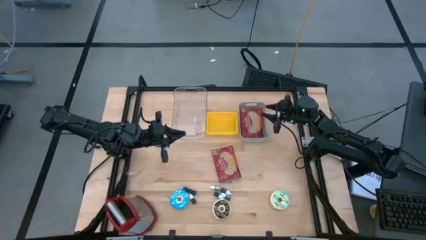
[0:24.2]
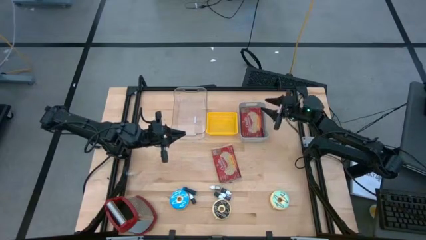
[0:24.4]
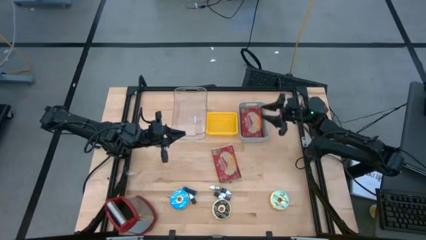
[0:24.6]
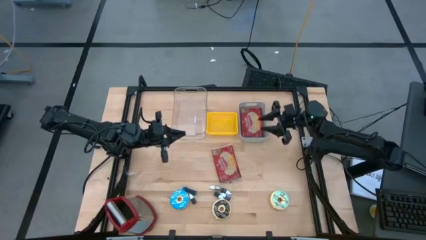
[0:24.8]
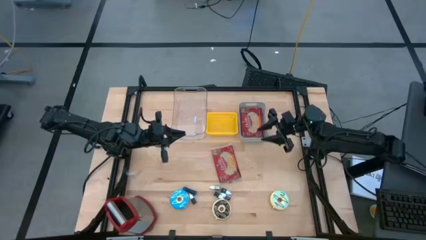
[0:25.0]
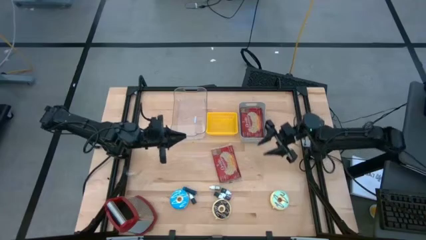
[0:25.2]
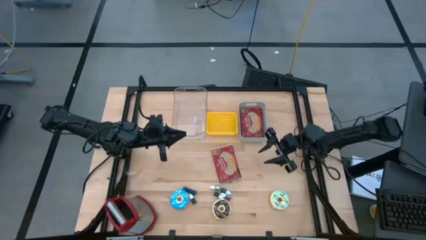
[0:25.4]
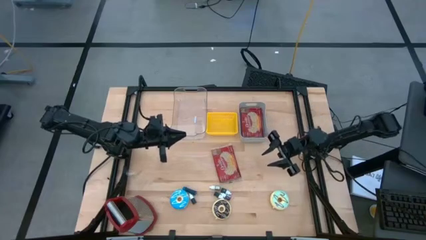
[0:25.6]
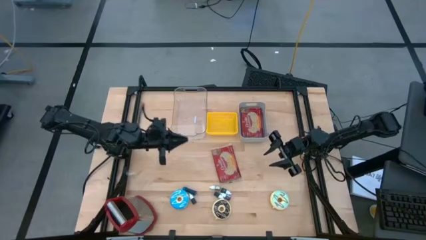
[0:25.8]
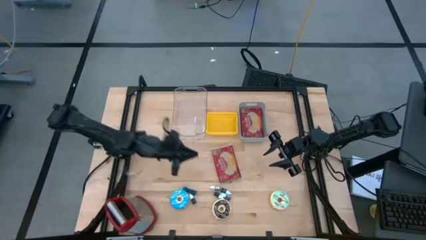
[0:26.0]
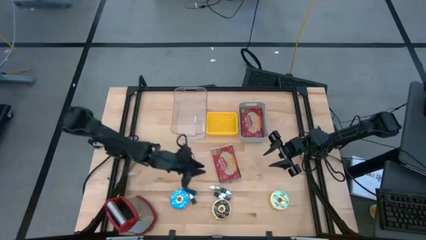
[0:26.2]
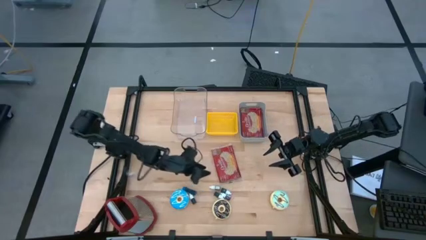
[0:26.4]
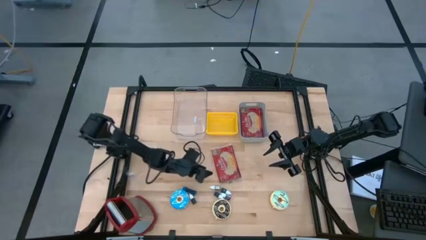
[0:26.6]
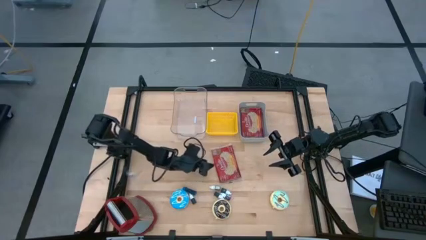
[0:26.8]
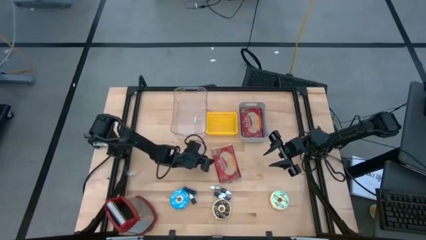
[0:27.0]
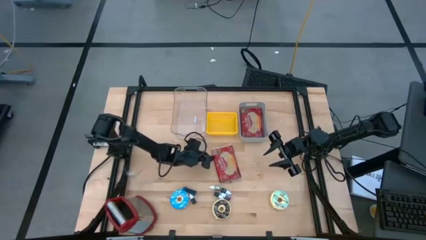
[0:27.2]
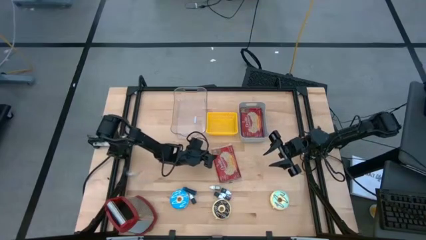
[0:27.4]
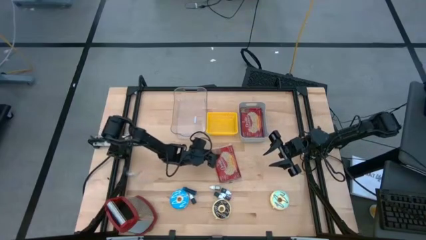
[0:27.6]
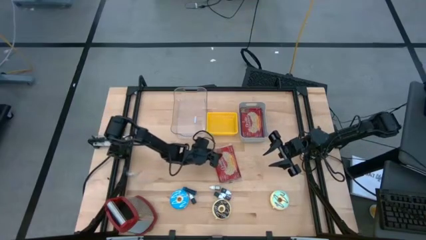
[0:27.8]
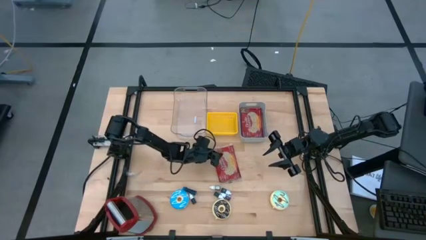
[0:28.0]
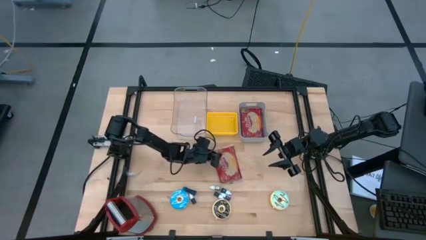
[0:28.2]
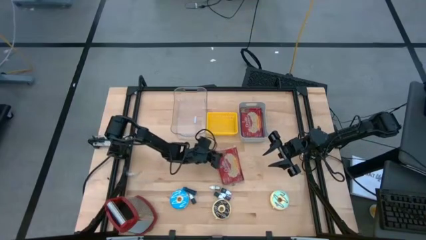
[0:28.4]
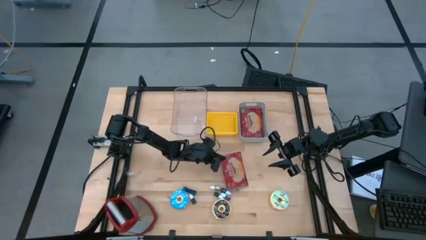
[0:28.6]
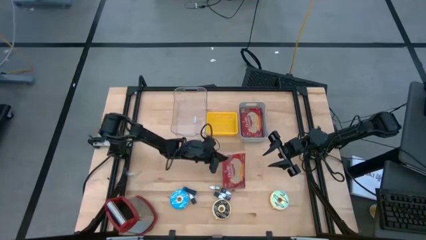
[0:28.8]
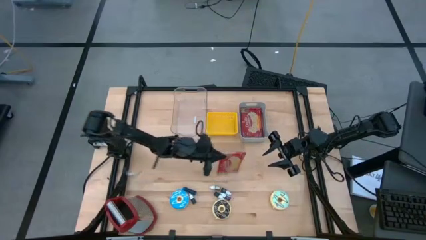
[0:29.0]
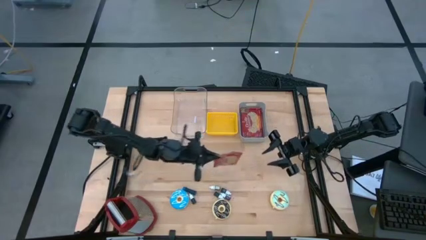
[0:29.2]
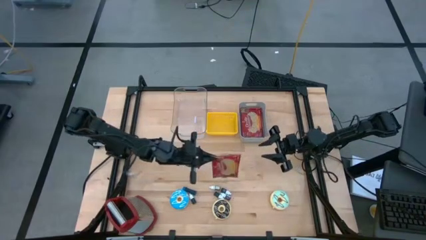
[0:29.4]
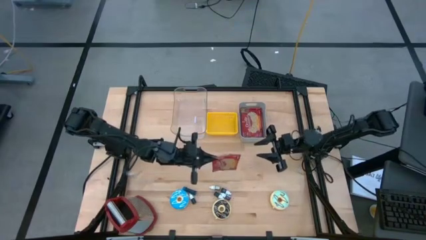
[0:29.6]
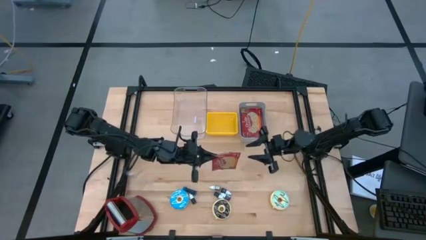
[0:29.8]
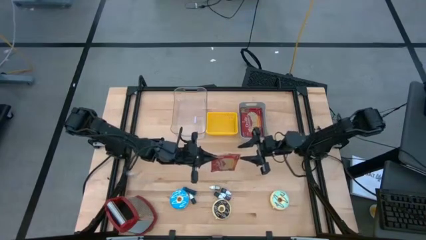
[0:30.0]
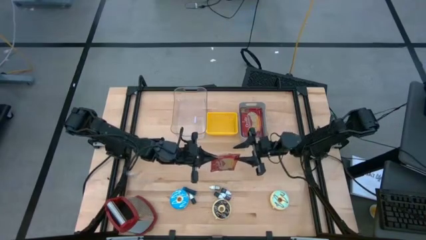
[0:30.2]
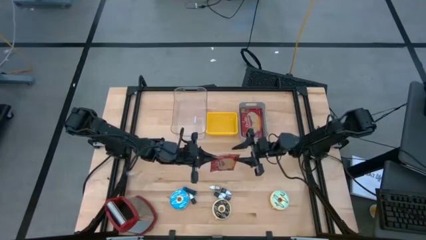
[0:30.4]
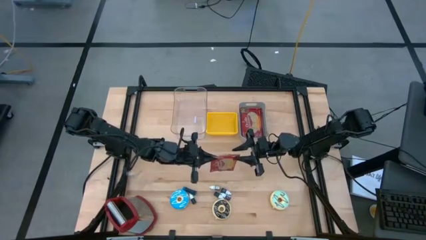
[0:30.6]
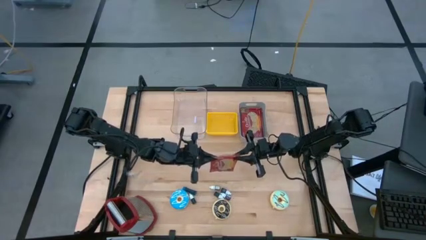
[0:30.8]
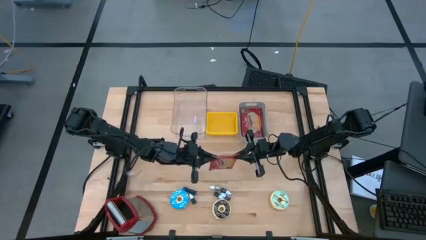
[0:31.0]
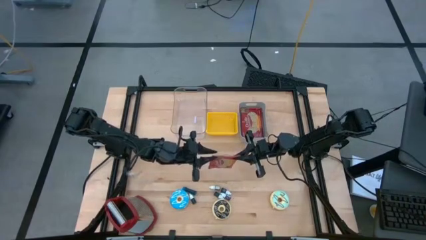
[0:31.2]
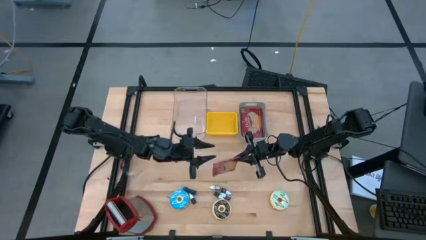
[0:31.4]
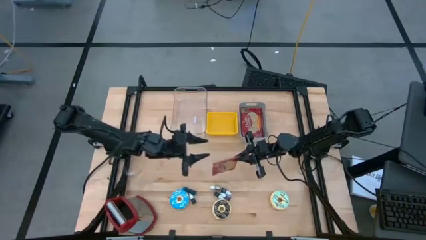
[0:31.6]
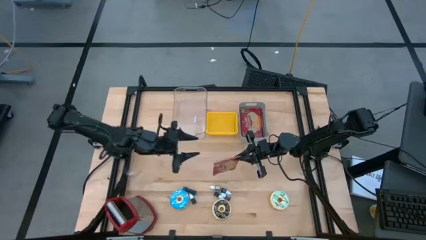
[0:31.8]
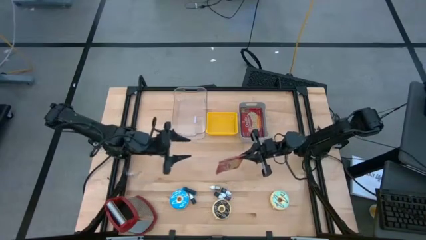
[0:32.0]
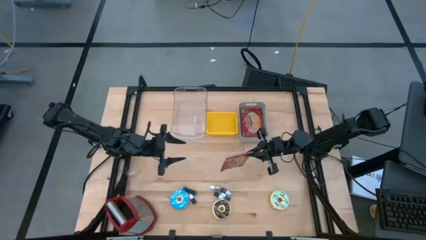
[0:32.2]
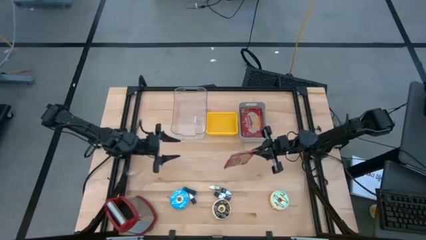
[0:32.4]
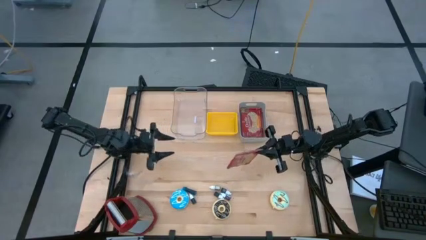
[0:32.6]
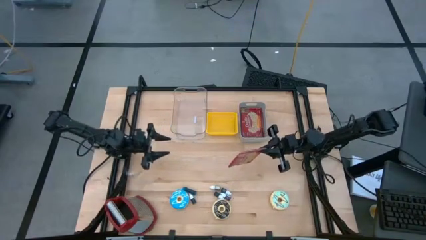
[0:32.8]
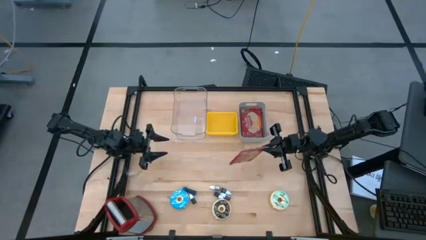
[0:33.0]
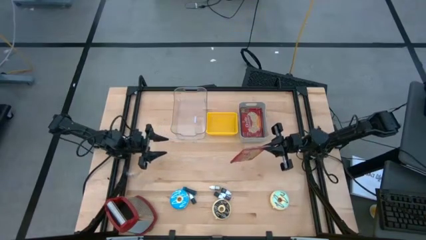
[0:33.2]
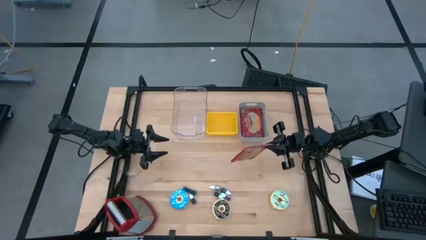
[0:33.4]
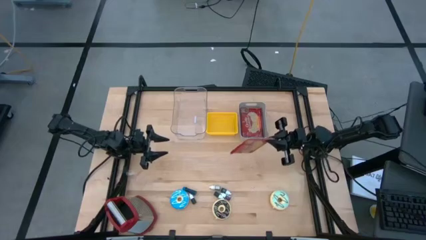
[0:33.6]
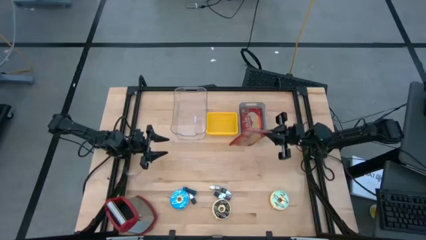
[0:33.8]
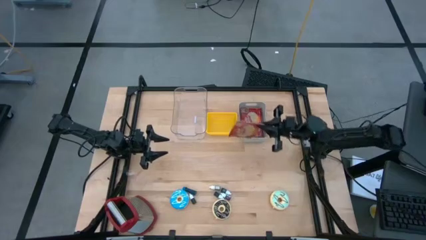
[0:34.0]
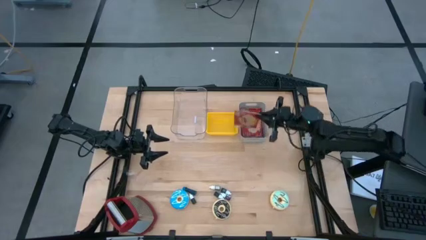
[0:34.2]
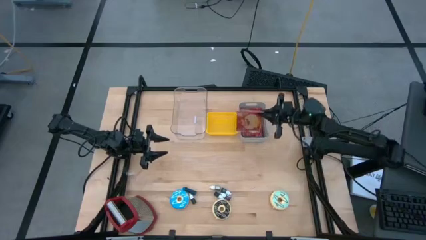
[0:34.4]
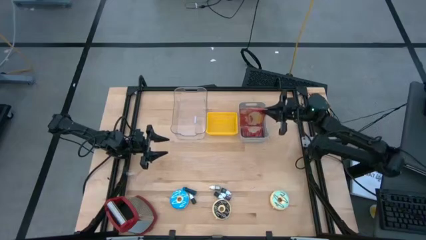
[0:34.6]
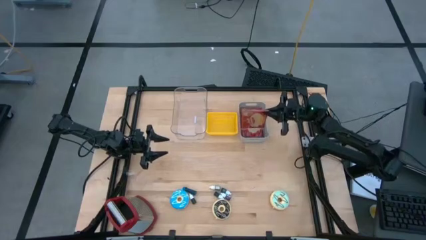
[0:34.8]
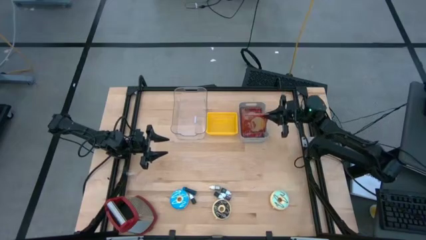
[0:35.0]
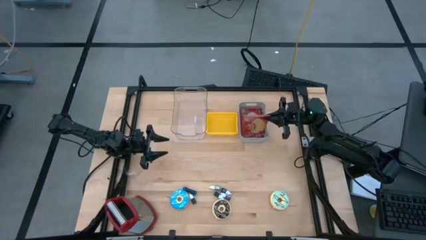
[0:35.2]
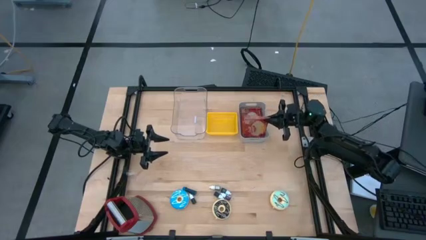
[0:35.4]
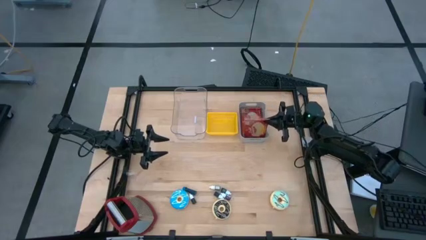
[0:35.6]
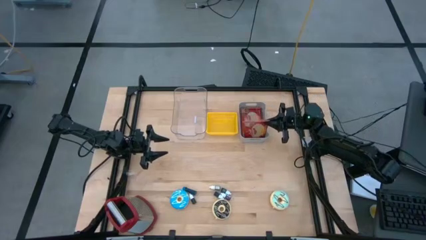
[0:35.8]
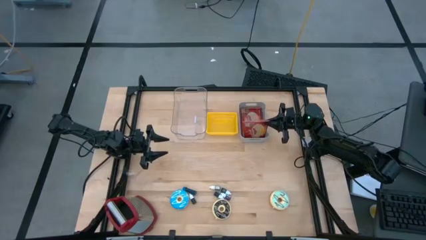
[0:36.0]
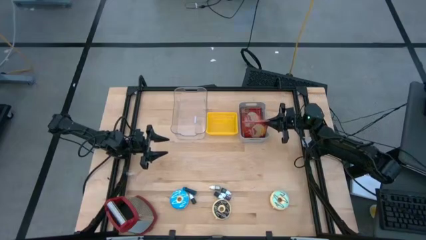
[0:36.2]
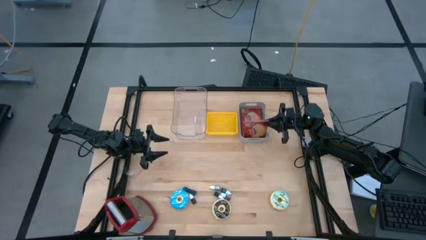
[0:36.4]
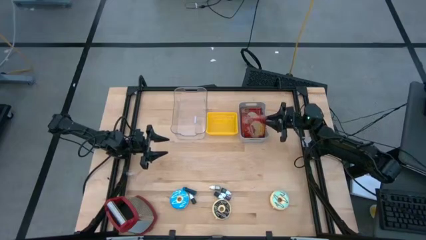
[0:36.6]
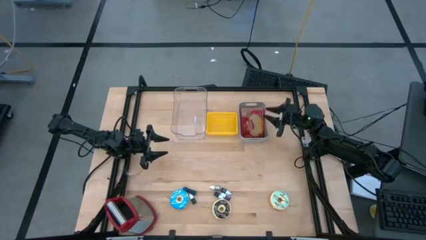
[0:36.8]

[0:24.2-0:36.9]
Put the red popcorn bag into the gray bin
